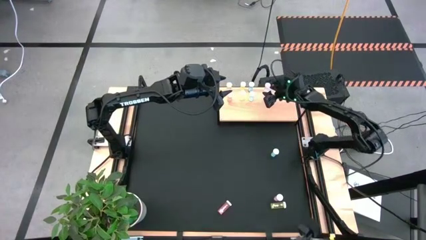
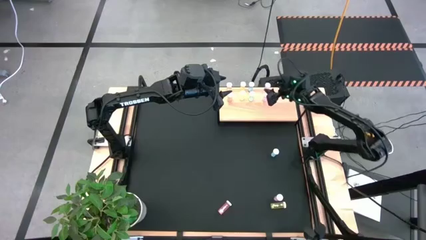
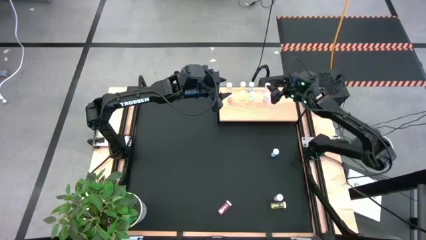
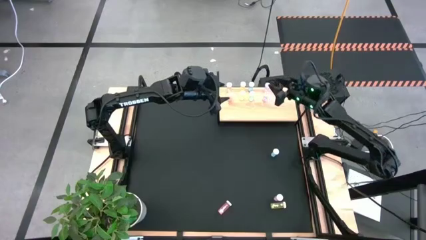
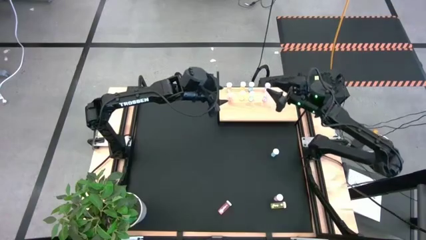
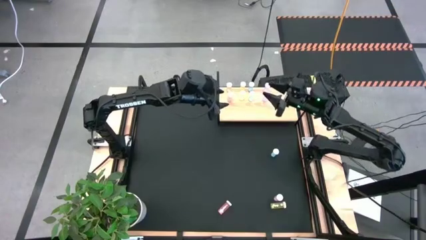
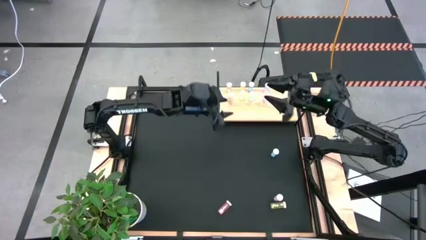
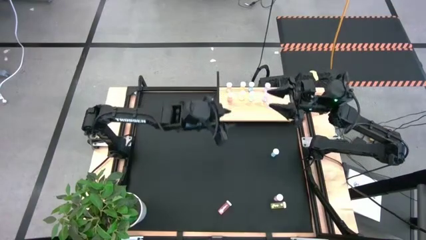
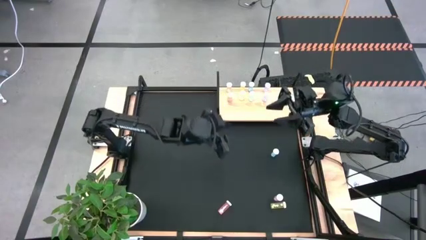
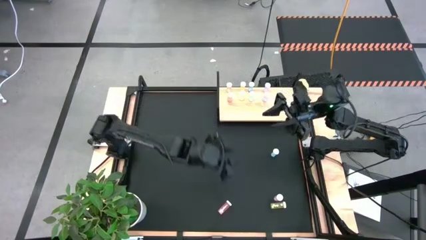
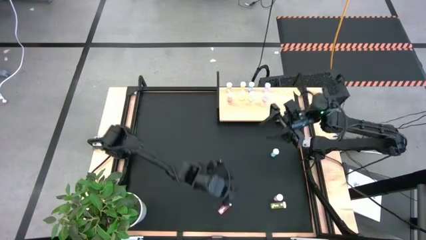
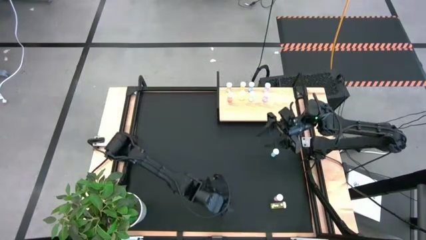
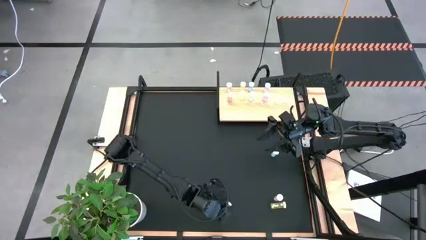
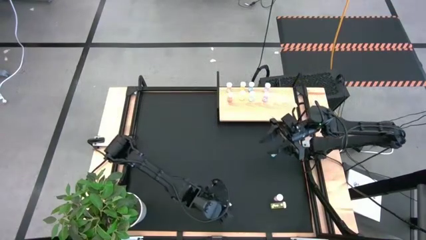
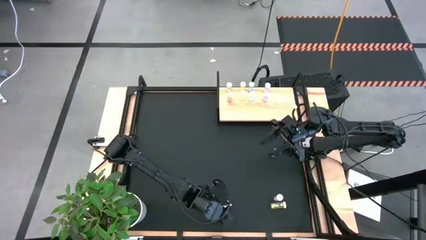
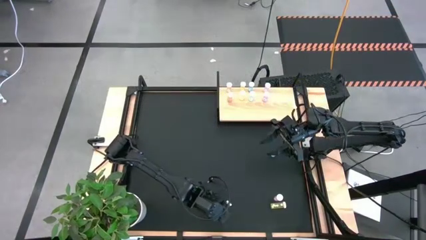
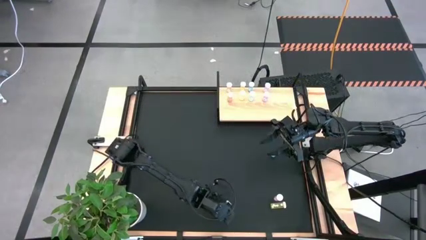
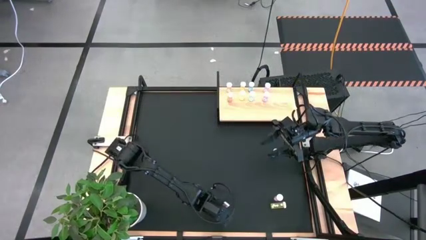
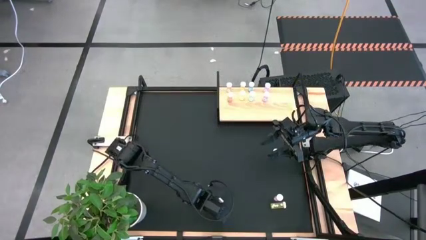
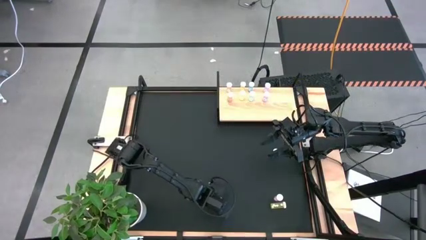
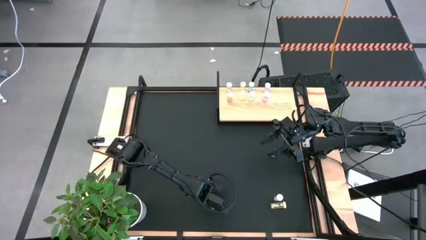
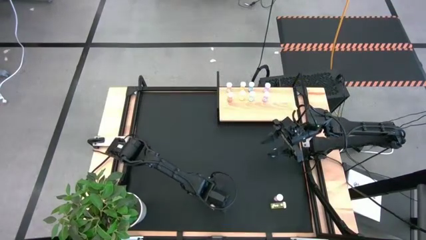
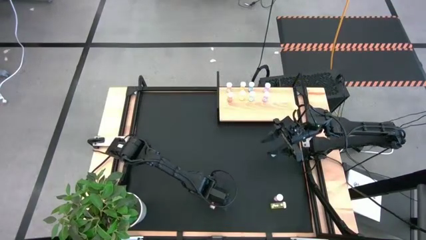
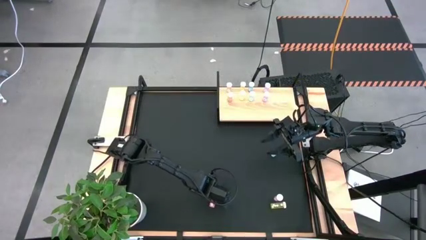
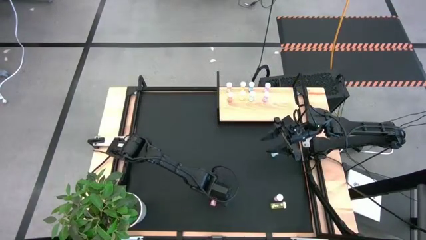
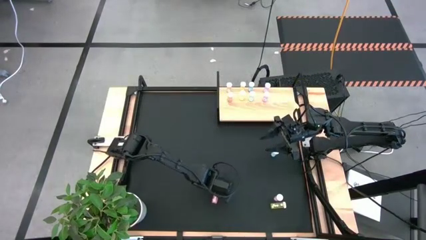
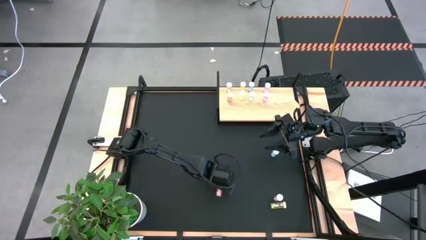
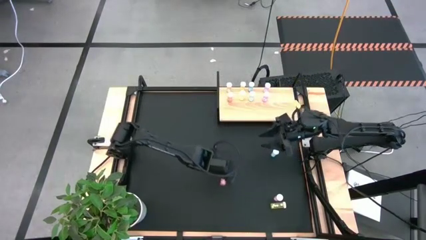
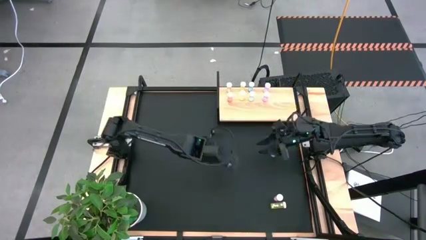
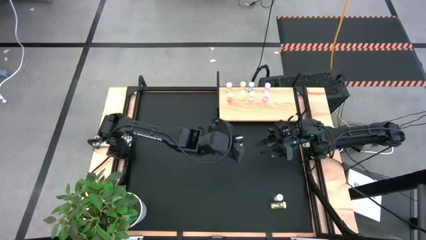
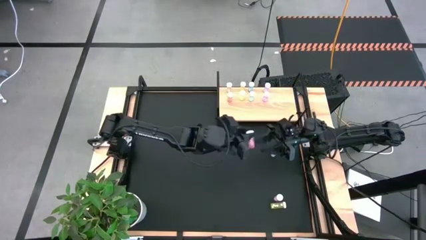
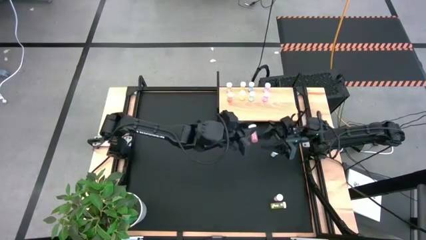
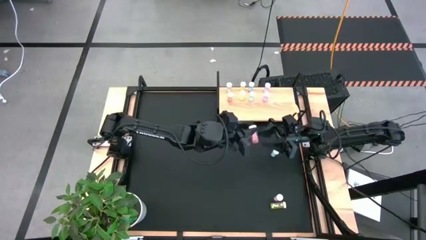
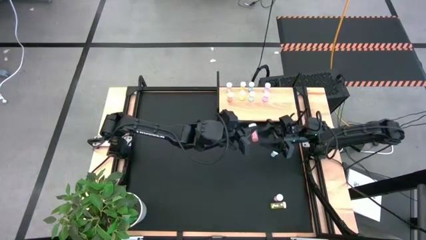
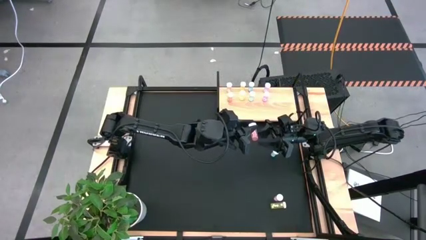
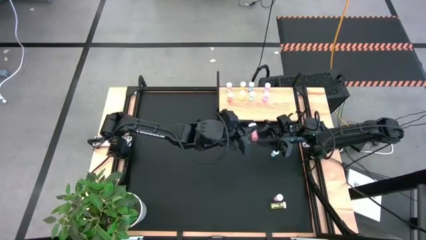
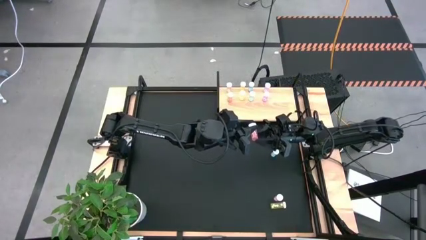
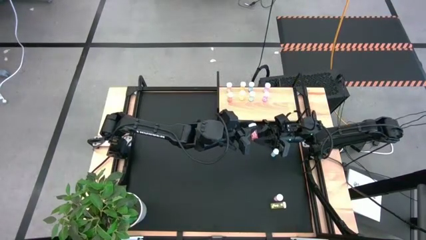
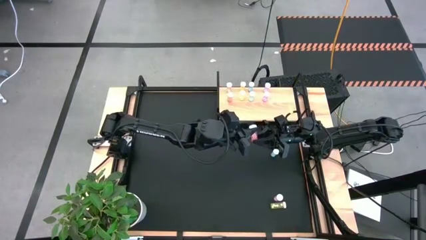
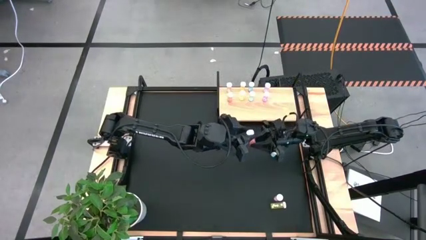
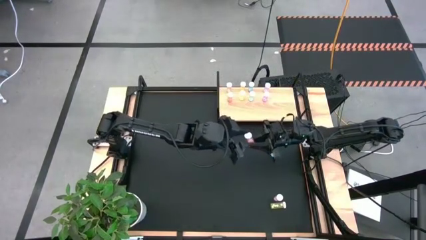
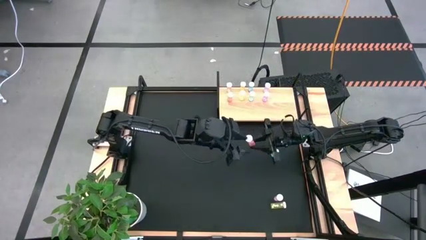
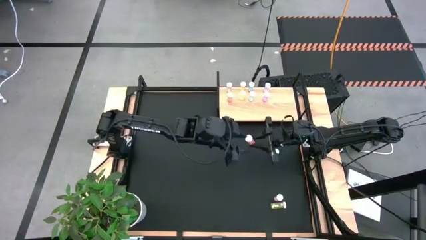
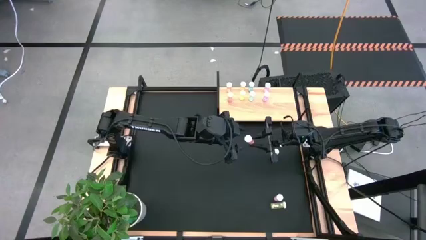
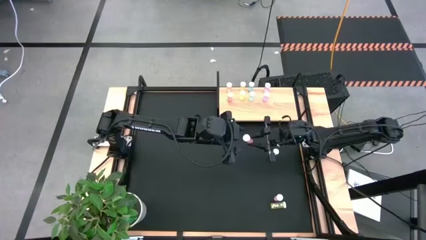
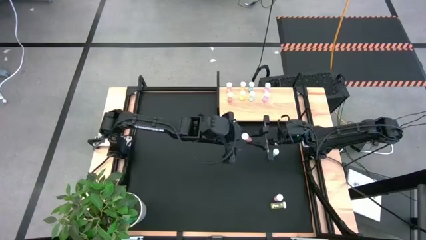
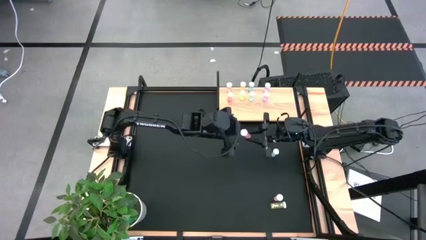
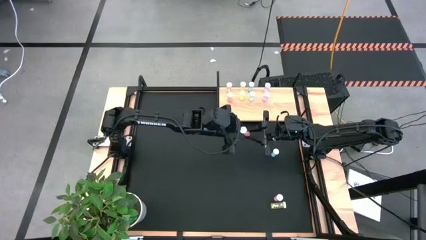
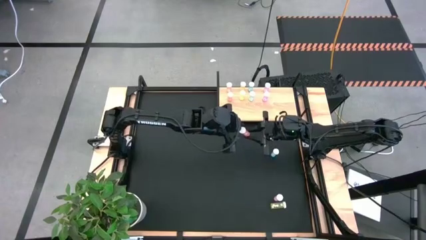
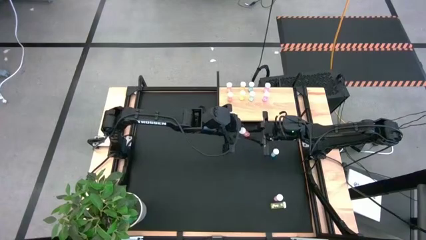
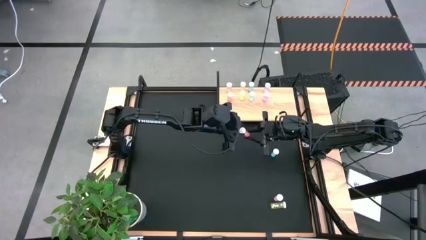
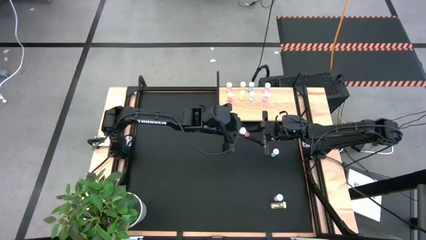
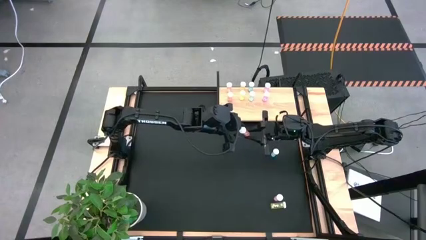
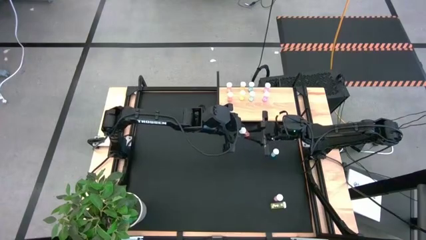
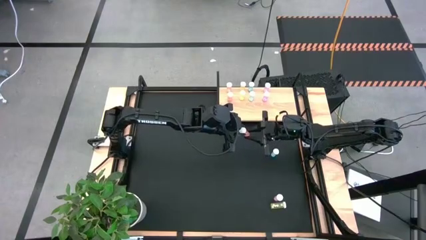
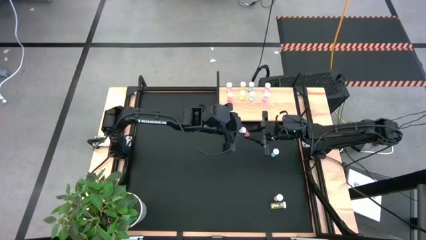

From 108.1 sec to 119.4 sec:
Task: Pick and place medicine bottles onto shelf by color
Put the pink pill bottle aligned with the other pink pill bottles on the shelf
